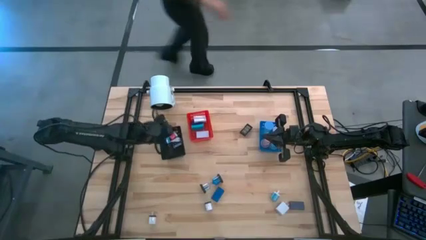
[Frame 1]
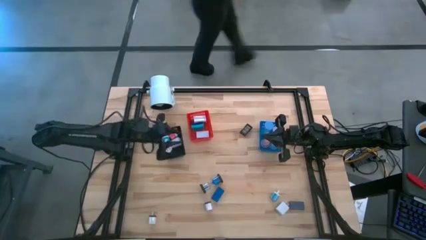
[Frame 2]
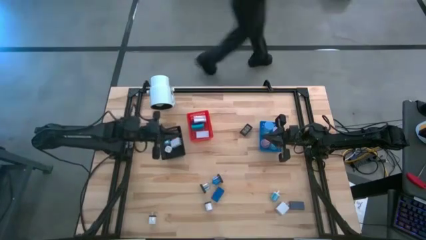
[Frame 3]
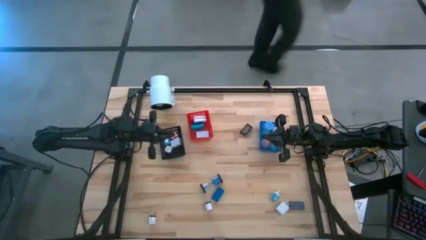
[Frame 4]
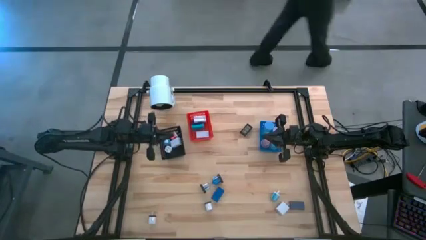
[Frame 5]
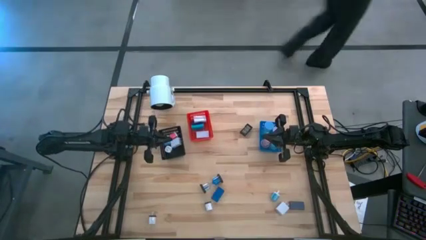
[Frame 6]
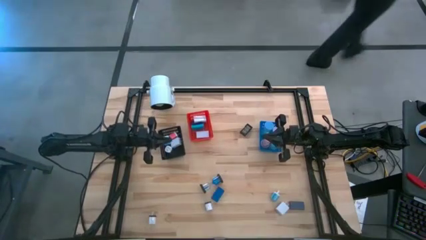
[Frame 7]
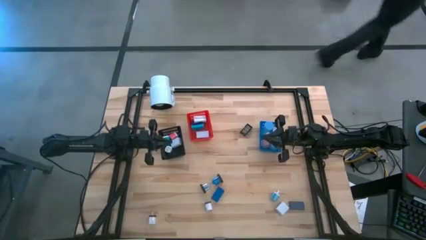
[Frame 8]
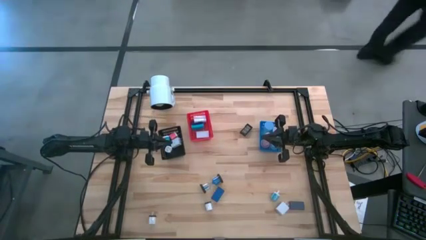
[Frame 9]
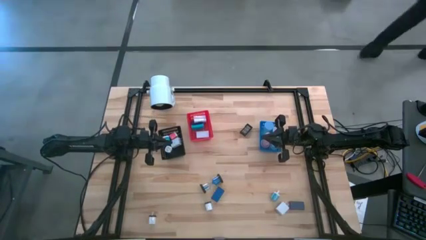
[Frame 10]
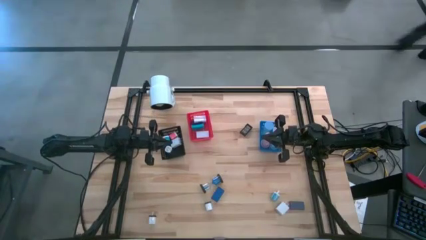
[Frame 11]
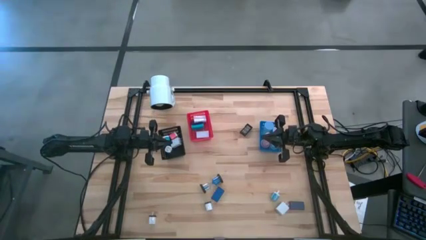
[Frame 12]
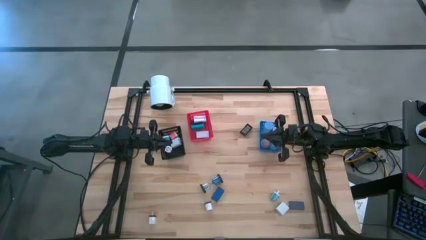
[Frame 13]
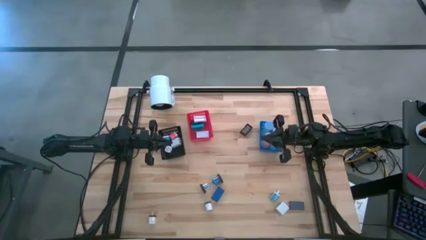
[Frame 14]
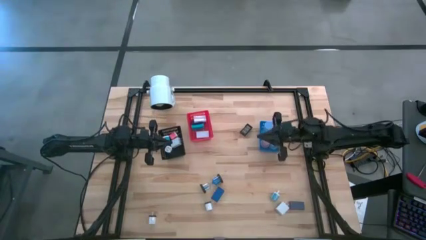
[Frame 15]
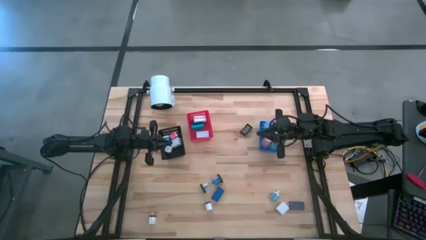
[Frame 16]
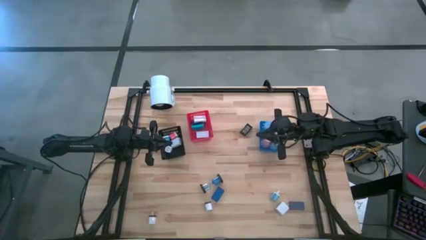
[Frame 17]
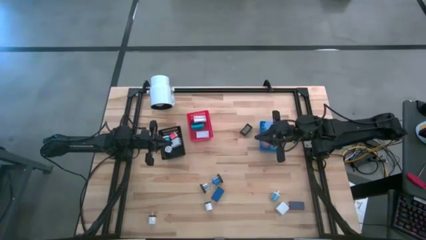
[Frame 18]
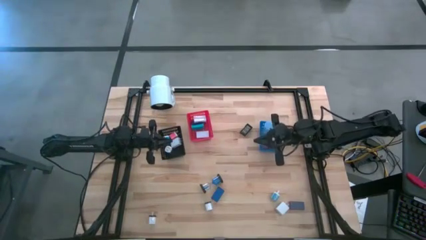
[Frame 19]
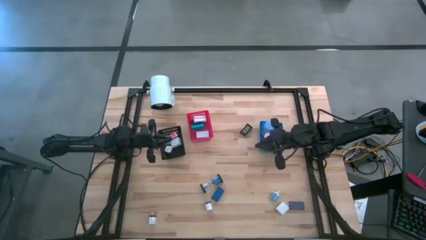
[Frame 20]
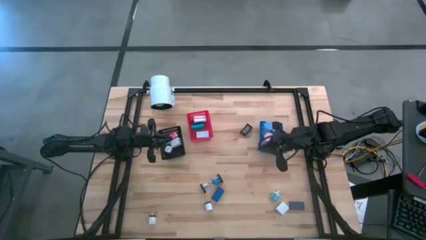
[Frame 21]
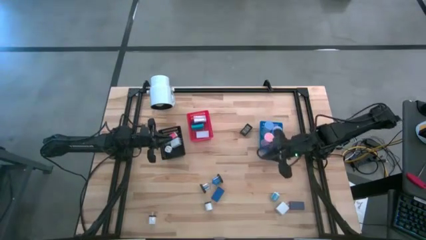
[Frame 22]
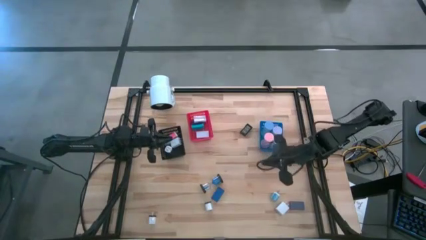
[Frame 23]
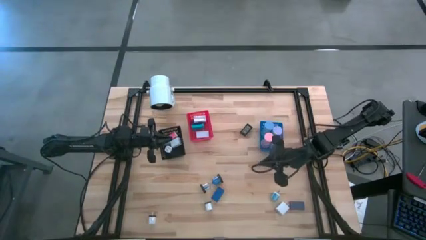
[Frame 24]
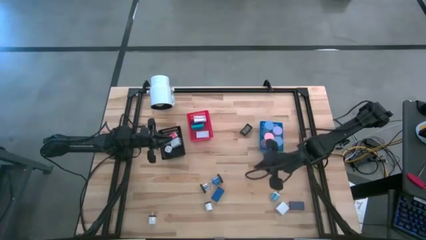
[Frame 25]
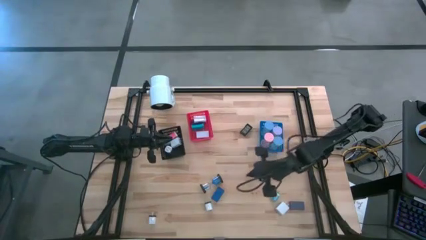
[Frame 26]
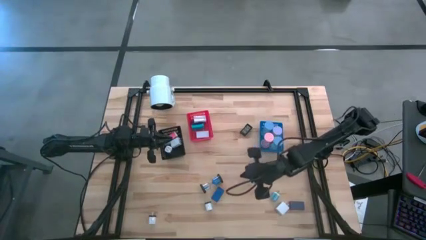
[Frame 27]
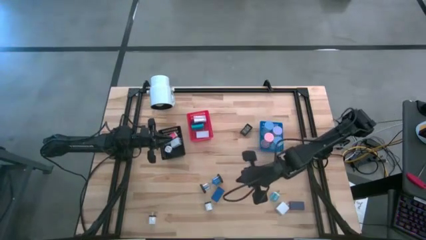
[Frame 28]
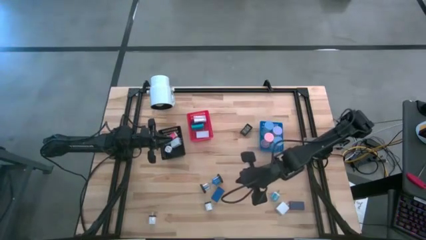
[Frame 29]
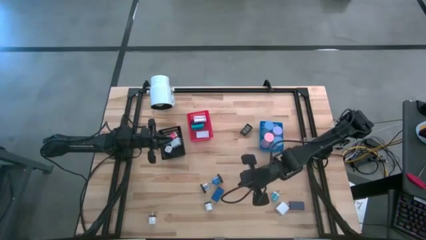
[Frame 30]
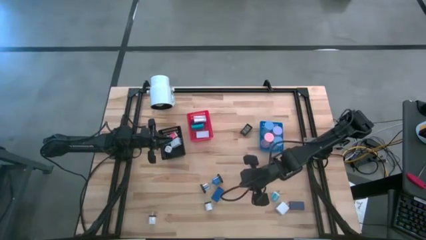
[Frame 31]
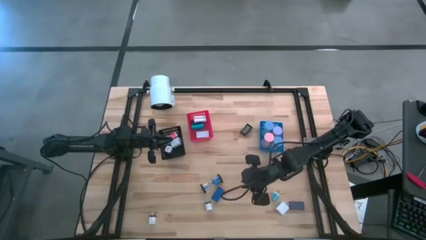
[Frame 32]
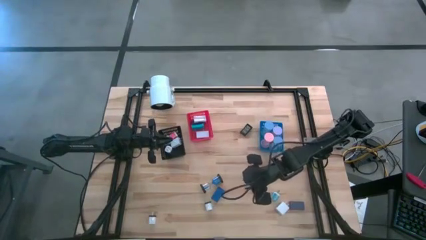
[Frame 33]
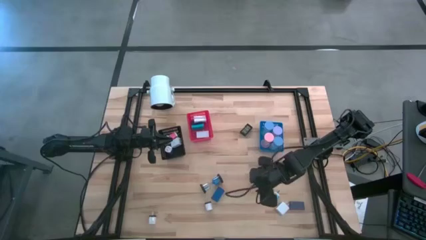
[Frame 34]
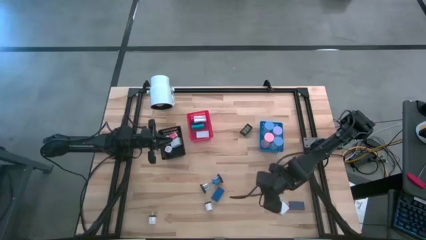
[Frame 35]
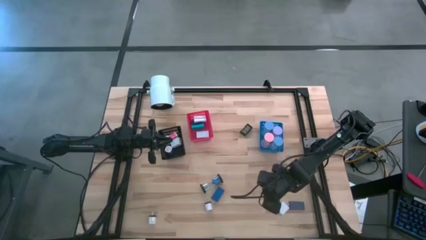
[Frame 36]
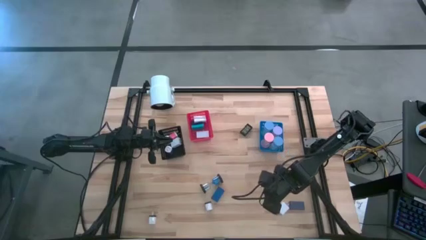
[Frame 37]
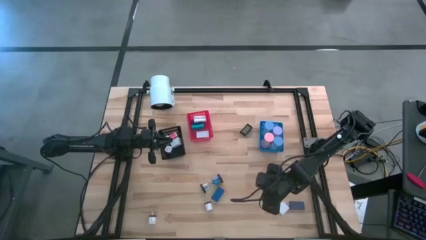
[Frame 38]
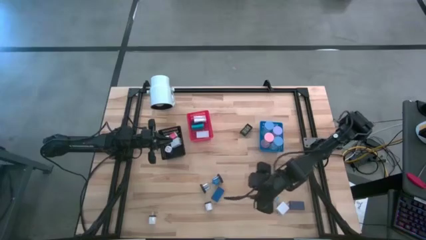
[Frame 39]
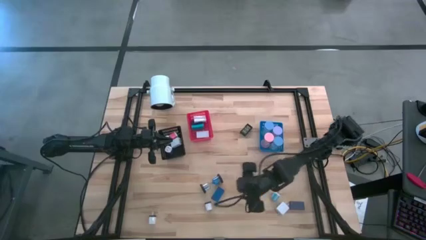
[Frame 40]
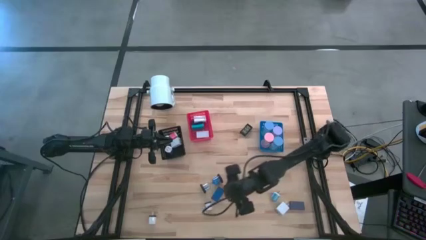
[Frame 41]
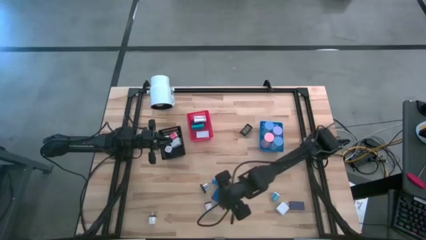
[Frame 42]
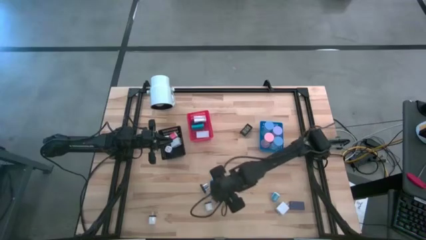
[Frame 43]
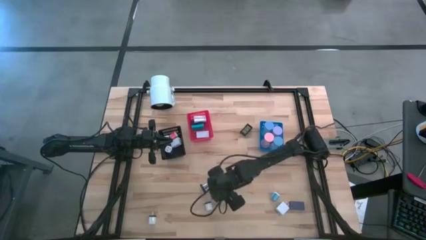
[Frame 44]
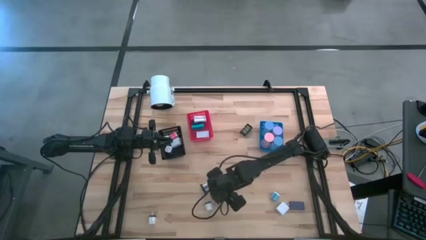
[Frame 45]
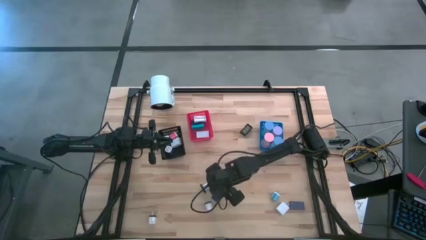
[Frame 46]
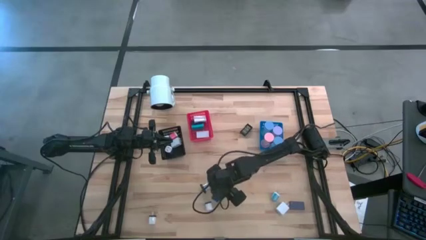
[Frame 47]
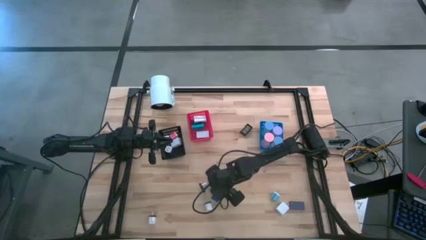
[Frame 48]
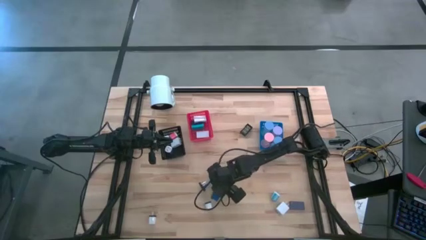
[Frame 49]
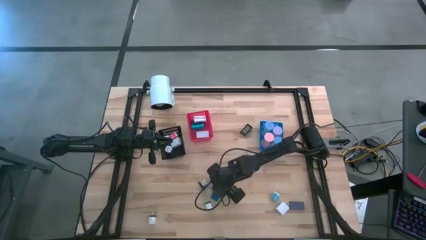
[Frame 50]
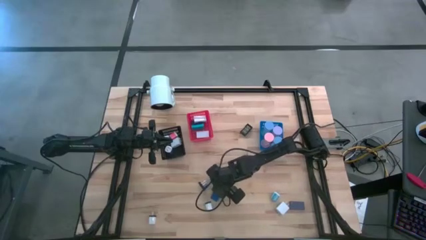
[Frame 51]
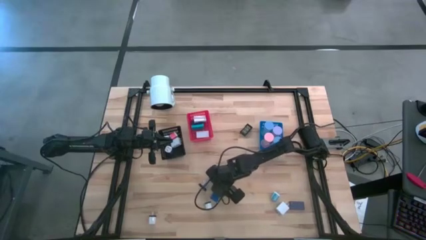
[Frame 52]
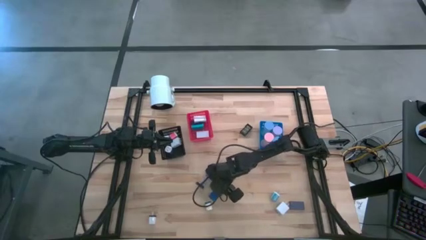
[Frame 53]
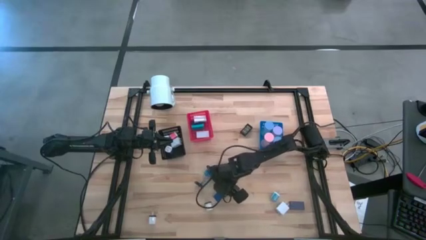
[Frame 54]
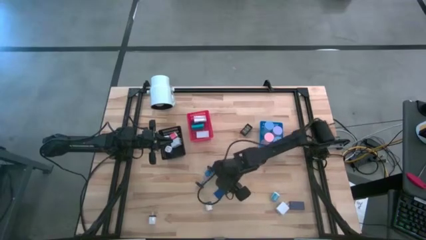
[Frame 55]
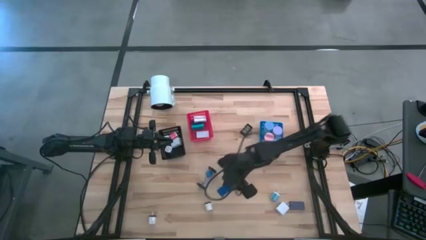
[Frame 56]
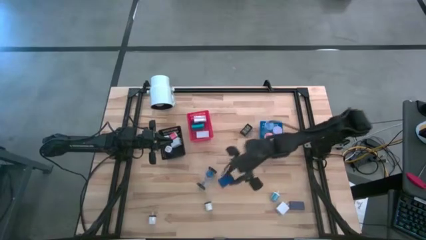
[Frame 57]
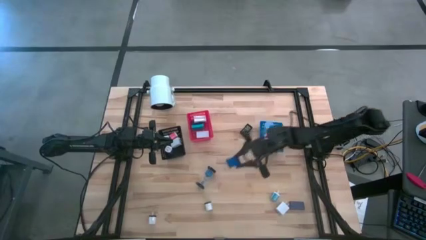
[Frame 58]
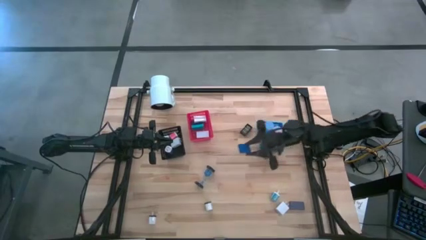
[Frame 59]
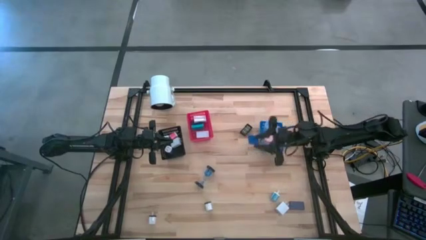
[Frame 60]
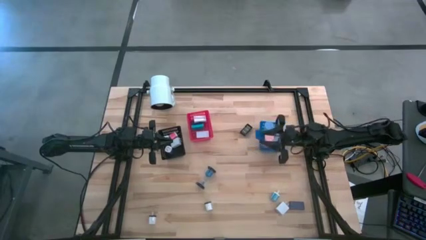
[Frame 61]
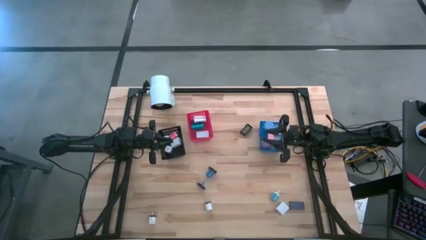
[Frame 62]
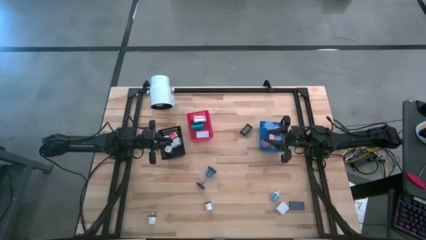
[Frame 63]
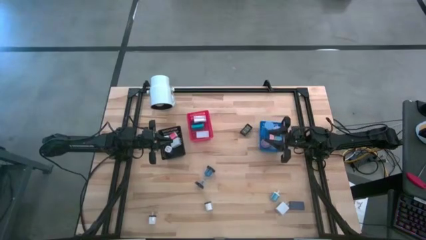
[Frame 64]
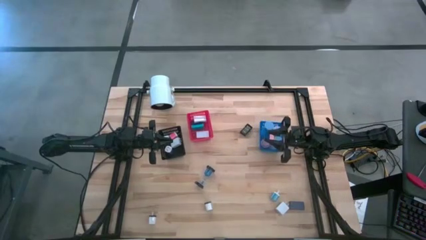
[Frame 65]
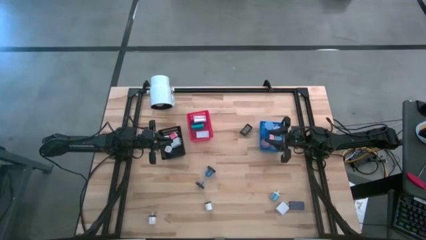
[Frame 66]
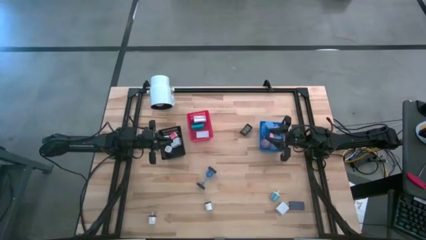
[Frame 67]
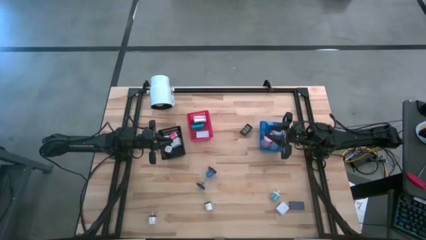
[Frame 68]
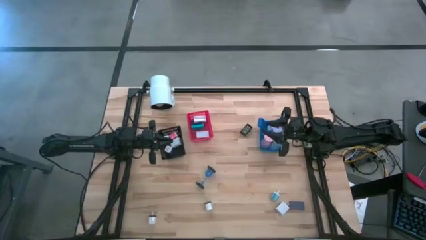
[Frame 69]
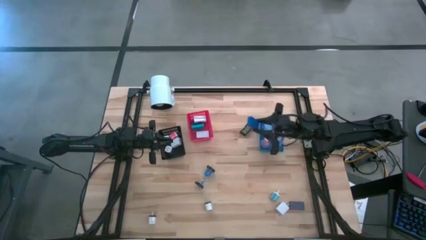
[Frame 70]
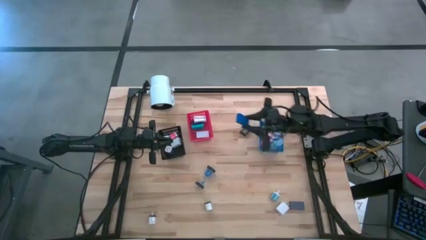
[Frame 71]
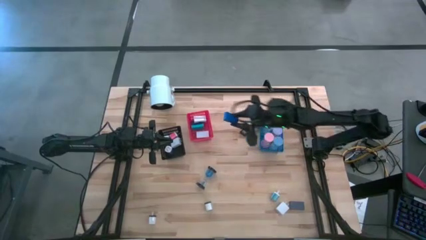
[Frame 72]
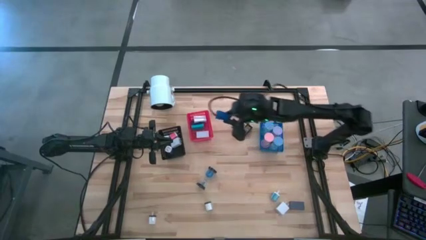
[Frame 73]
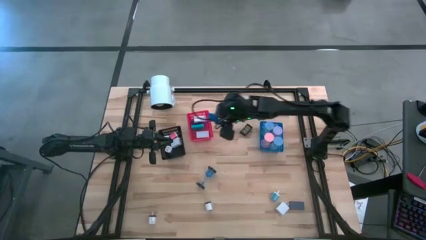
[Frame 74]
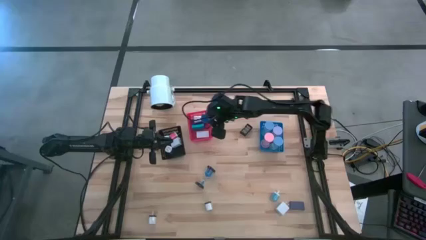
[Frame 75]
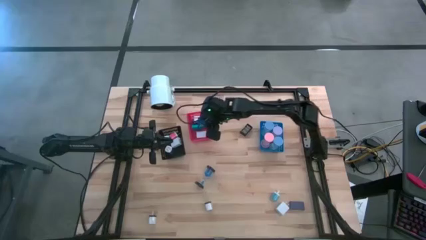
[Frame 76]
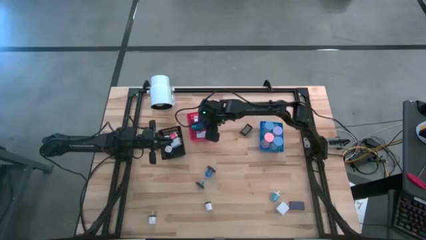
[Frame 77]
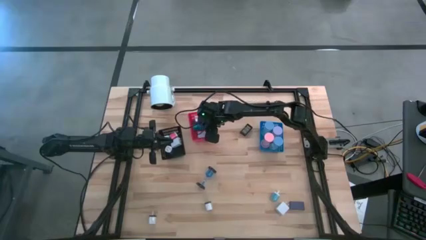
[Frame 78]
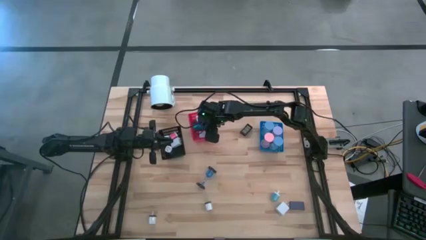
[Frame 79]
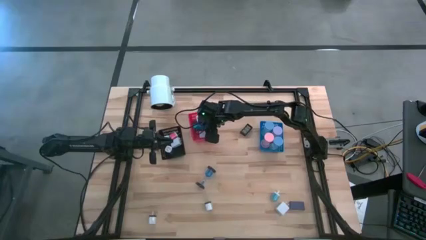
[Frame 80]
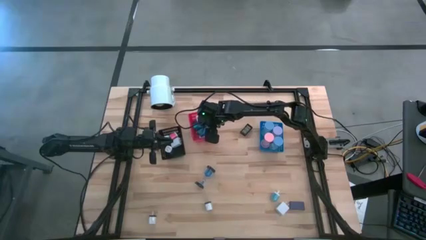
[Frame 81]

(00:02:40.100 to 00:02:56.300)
Task: Pick & Place Office items
Put the dark blue digital clock into the red bin
